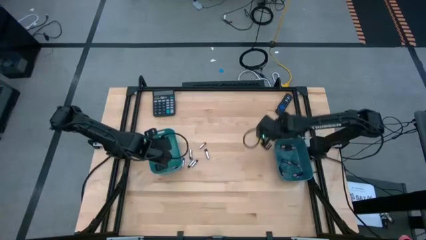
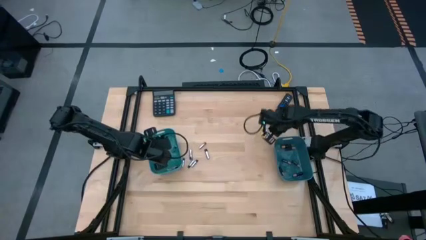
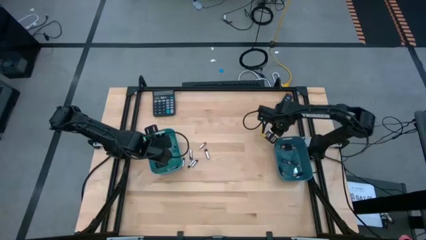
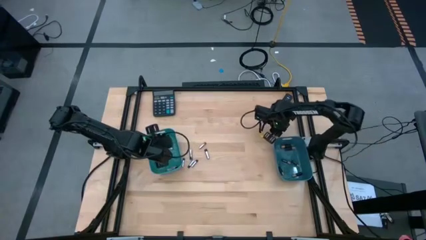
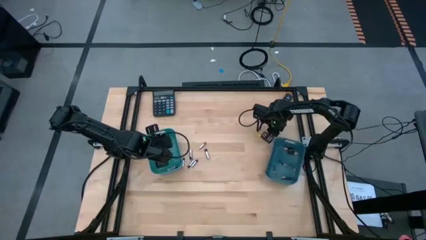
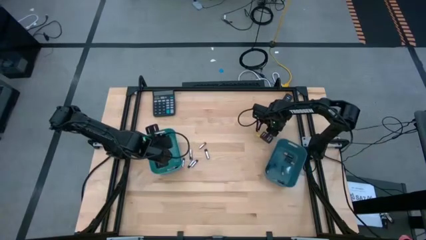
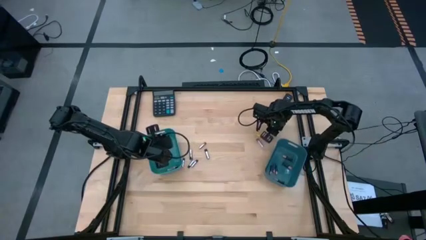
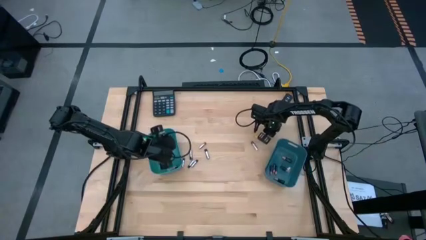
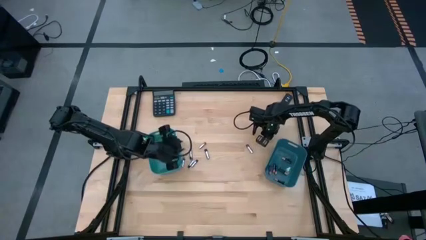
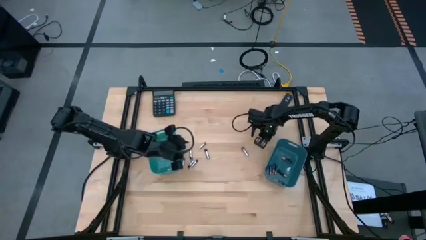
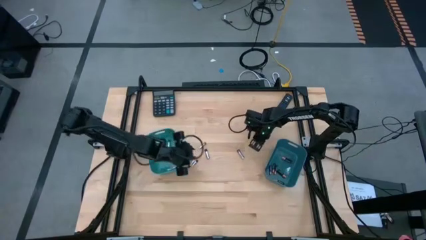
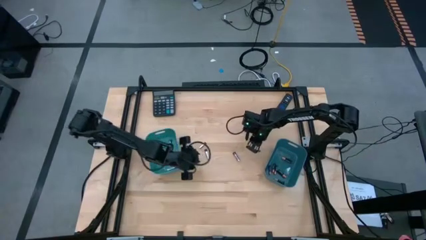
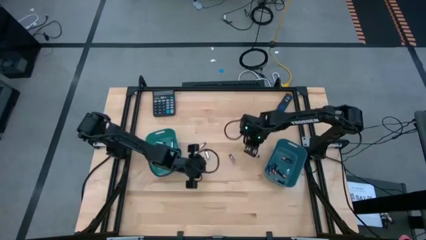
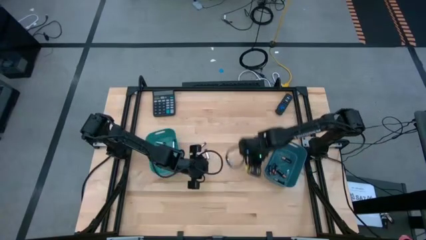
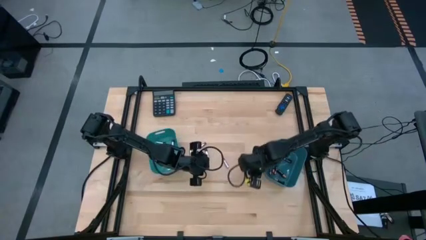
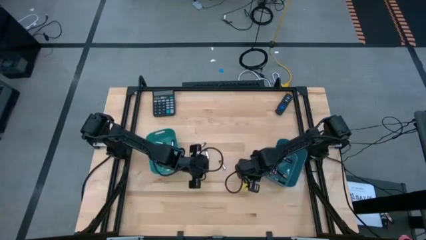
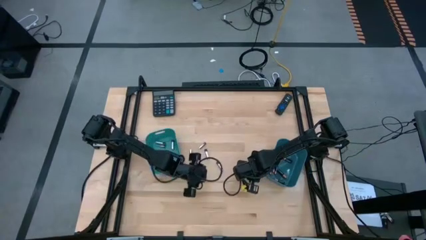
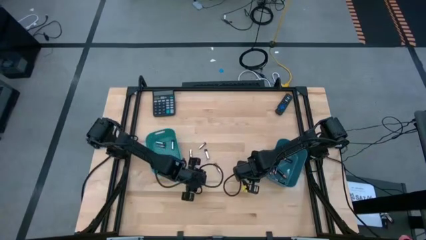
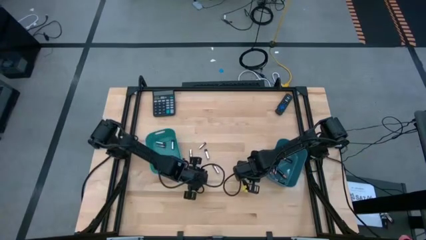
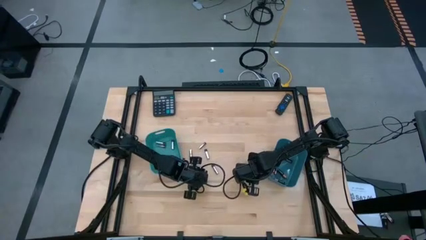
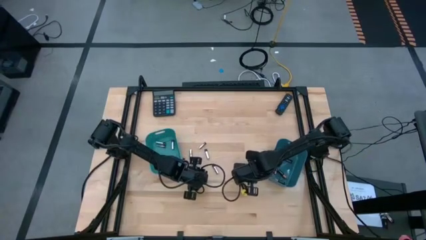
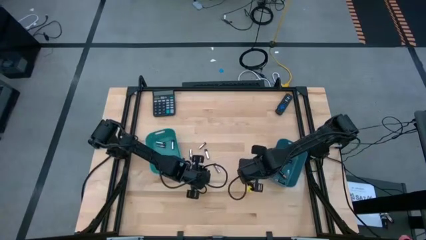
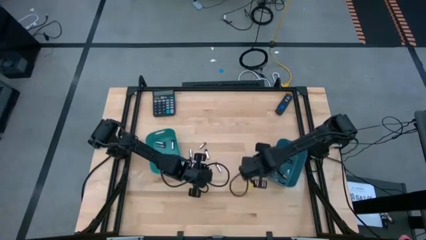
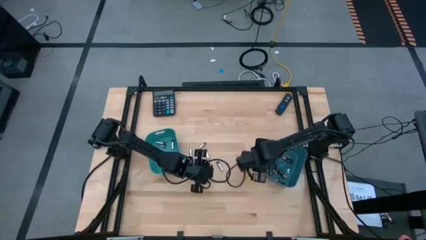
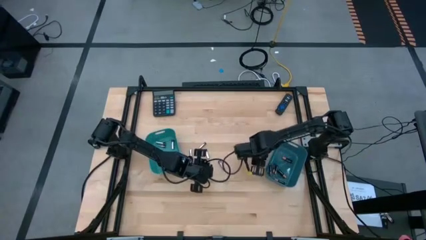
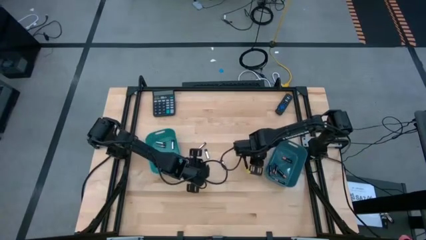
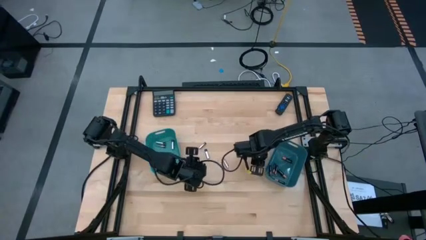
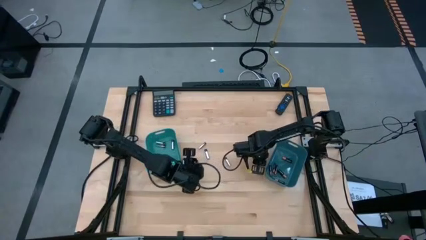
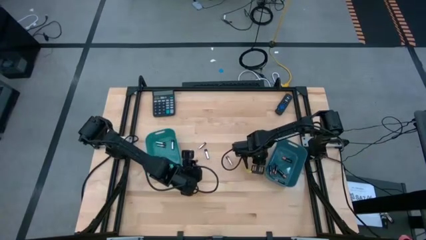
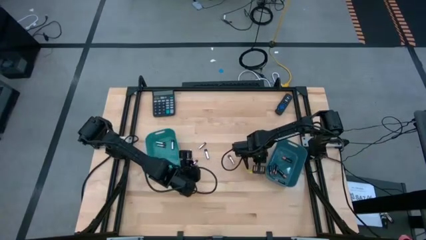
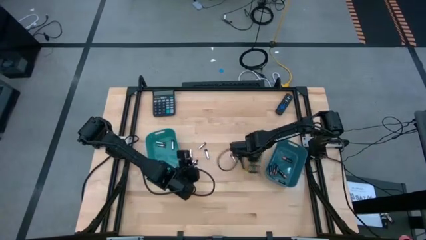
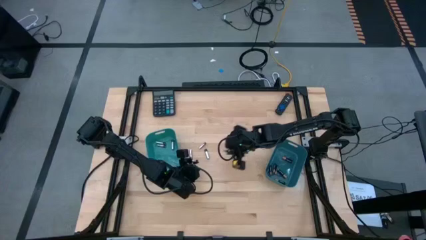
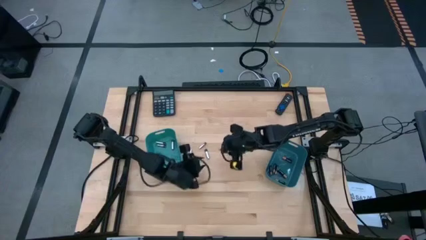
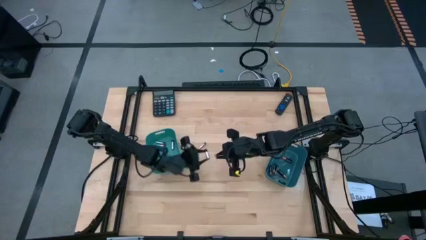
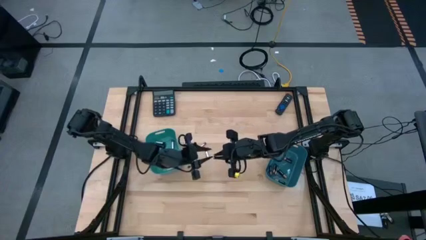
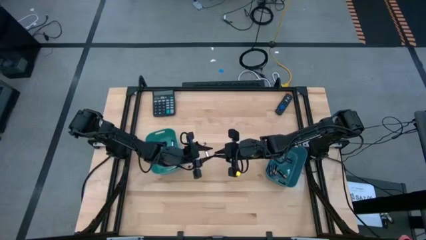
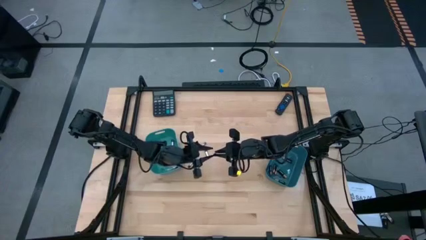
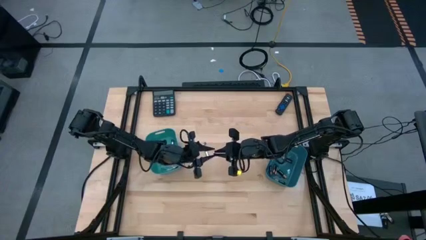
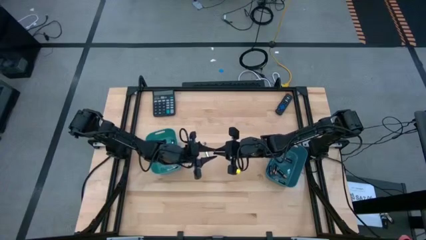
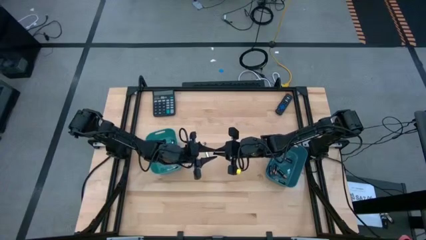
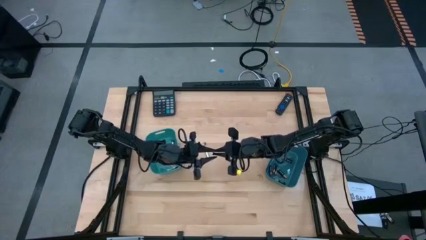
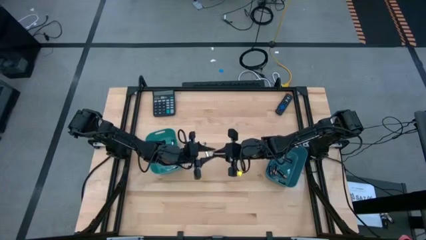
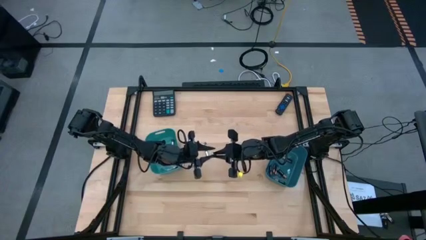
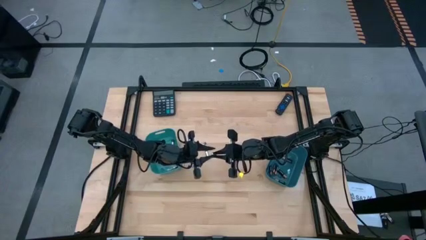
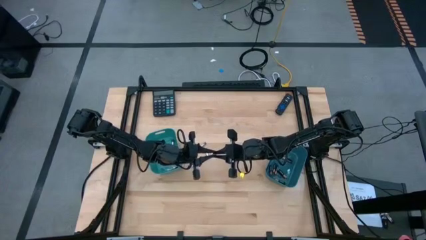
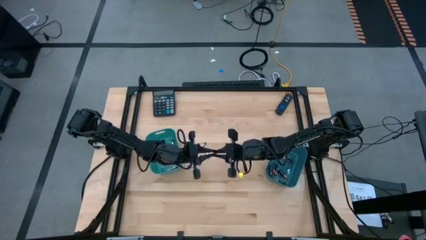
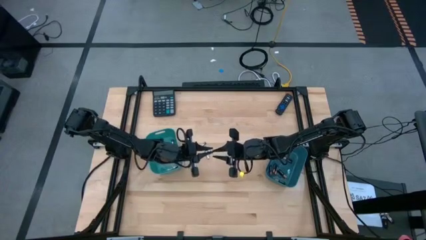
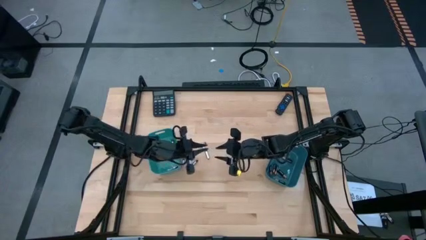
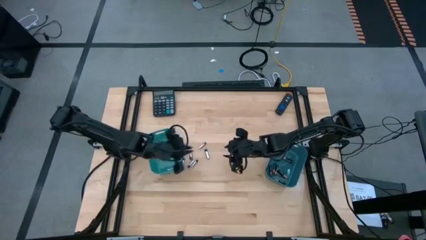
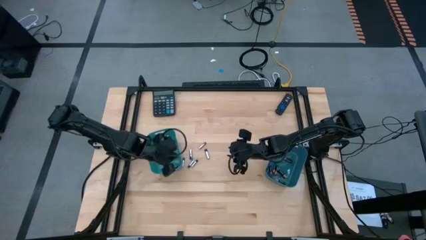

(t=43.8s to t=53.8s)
Task: Sort batteries
Put the white battery into the left blue bin

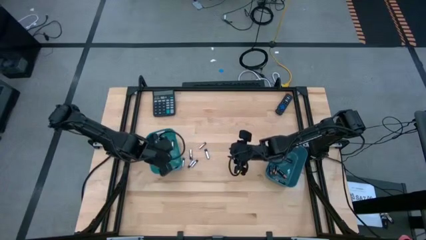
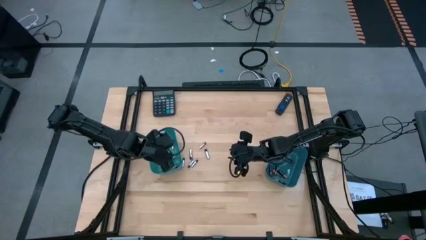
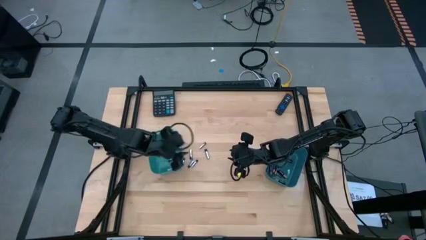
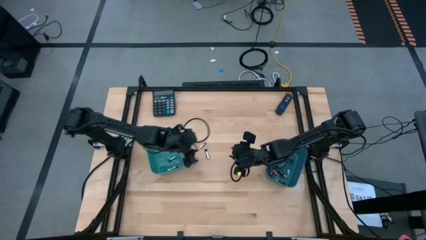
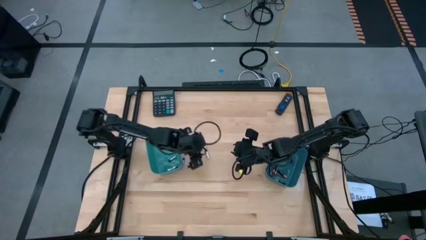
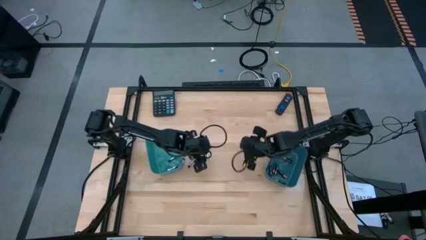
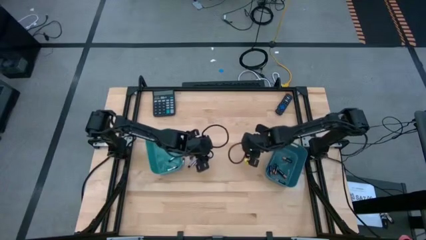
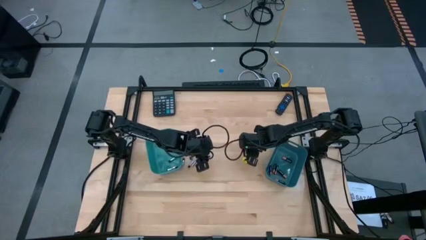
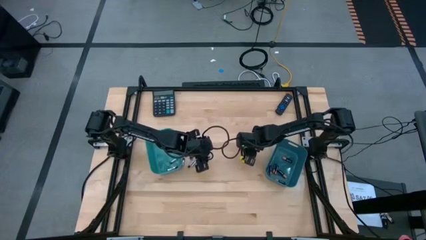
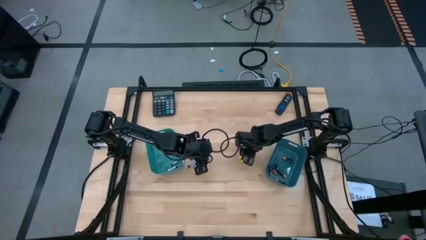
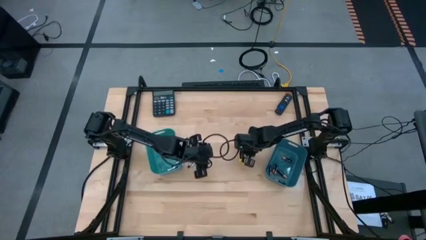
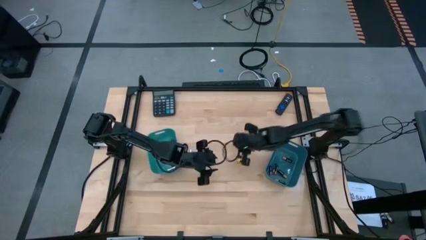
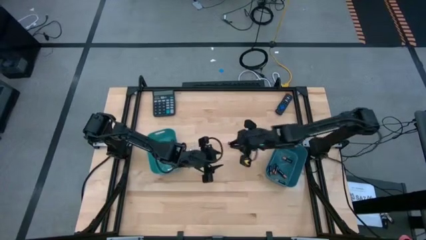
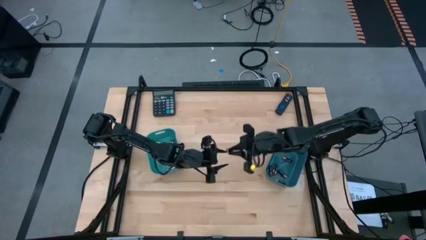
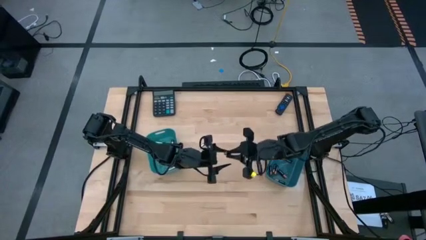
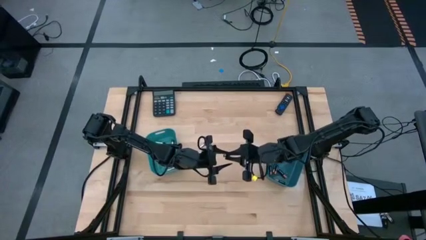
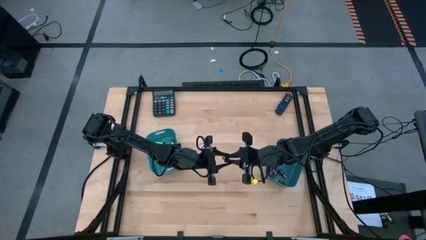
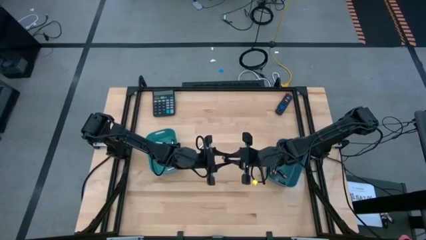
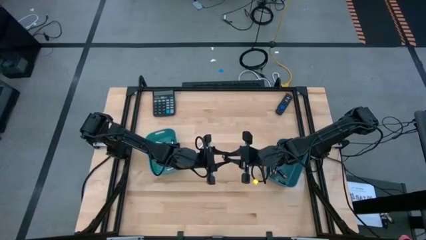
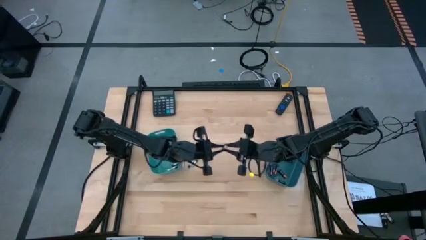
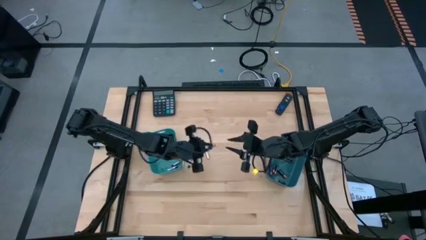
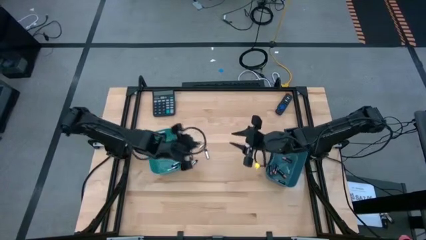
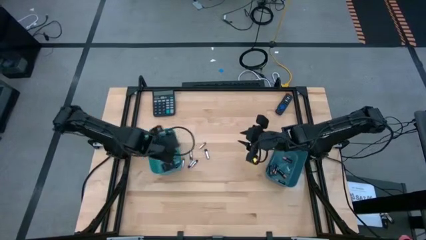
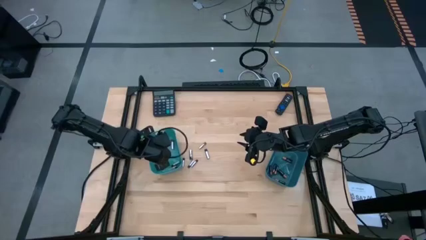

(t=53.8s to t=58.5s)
Put the white battery into the left blue bin

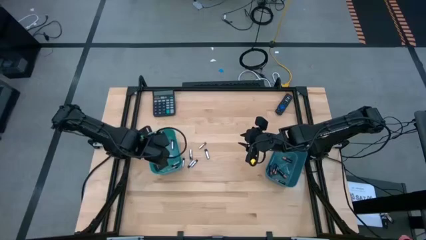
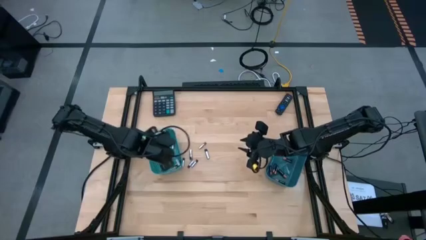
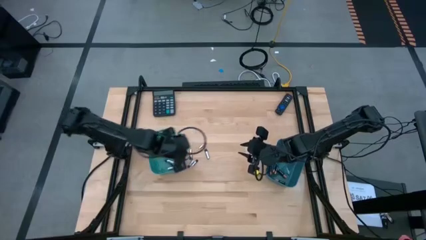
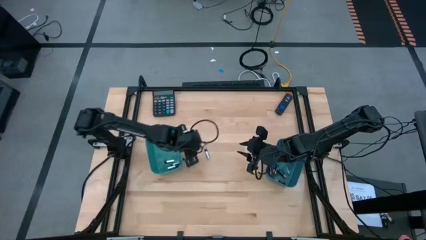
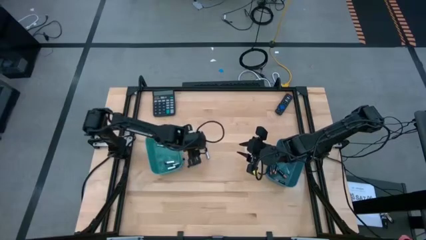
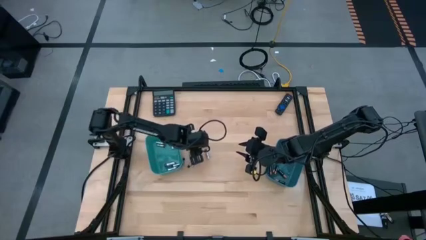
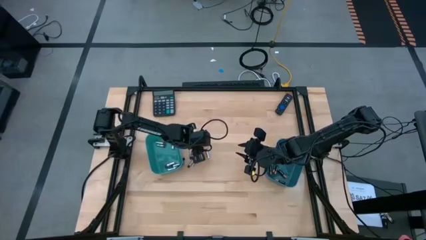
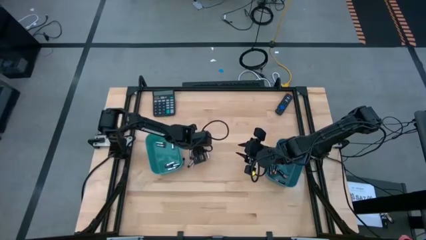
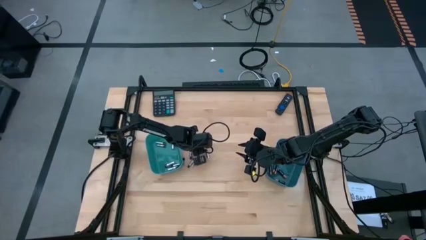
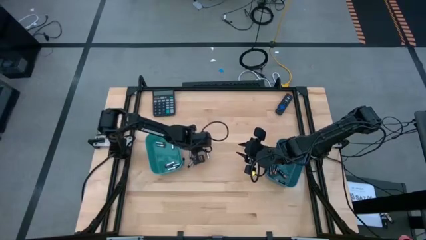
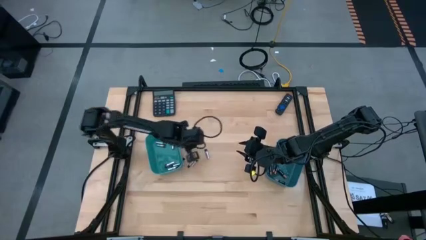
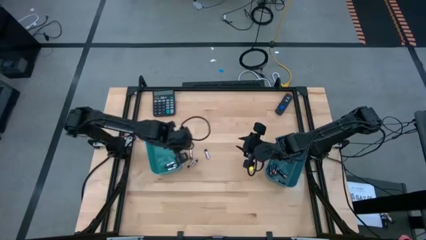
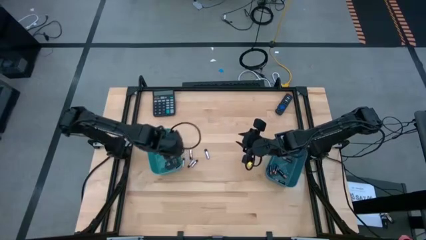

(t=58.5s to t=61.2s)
Put the white battery into the left blue bin
